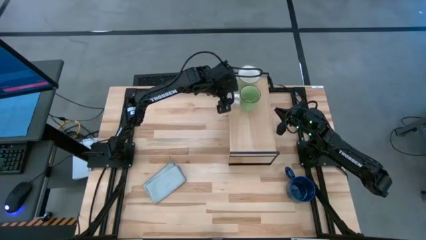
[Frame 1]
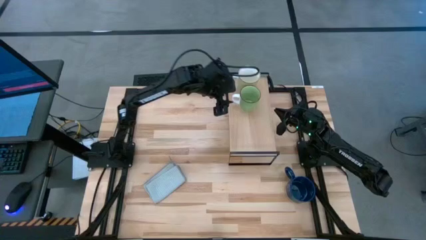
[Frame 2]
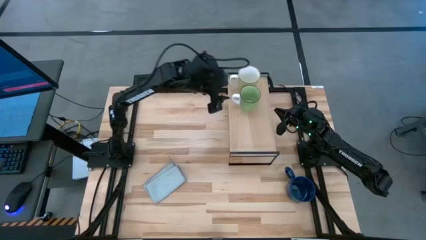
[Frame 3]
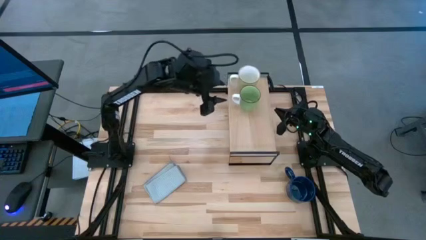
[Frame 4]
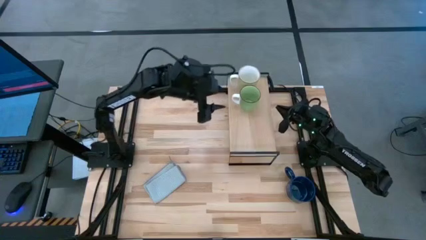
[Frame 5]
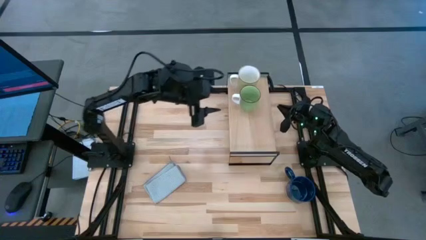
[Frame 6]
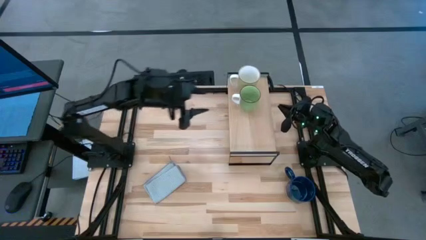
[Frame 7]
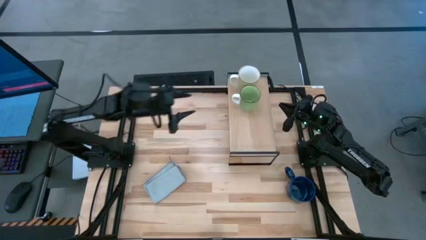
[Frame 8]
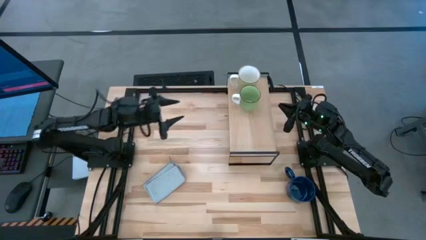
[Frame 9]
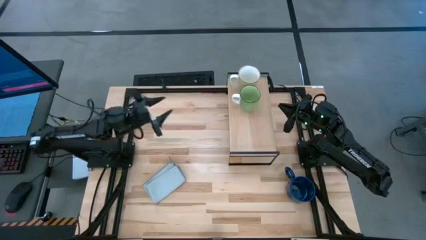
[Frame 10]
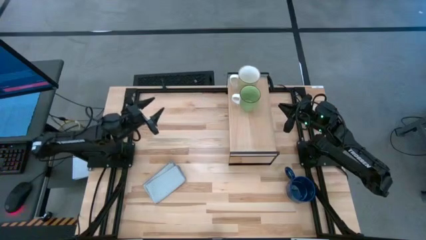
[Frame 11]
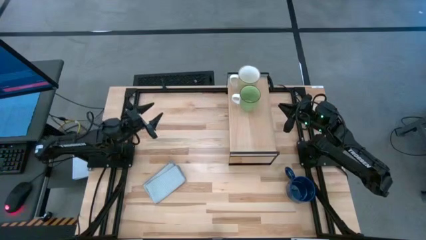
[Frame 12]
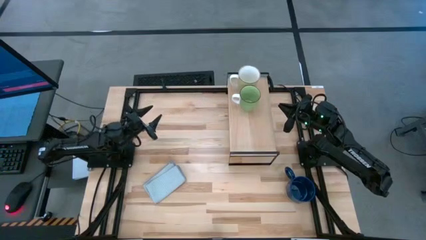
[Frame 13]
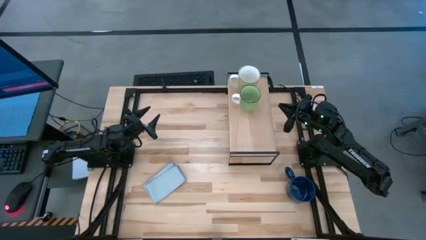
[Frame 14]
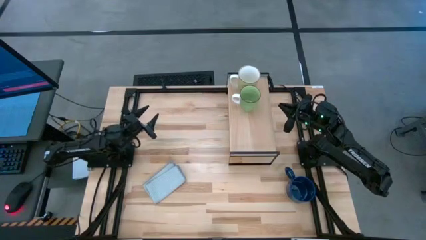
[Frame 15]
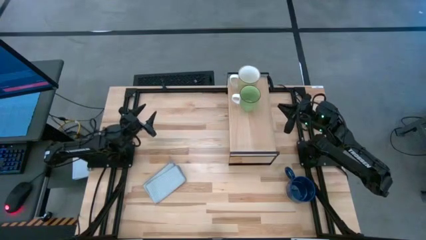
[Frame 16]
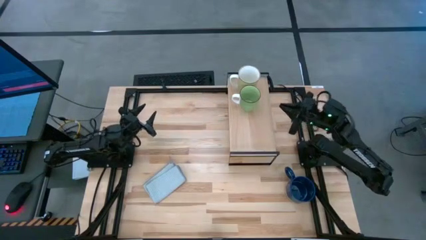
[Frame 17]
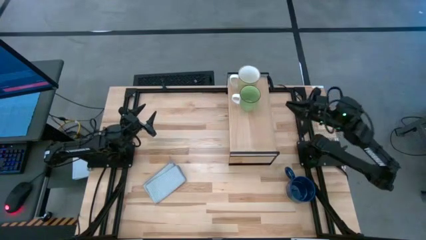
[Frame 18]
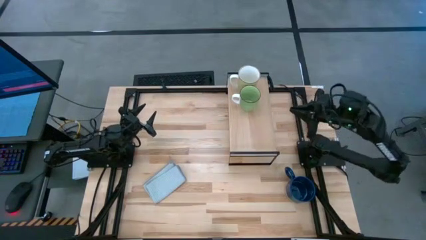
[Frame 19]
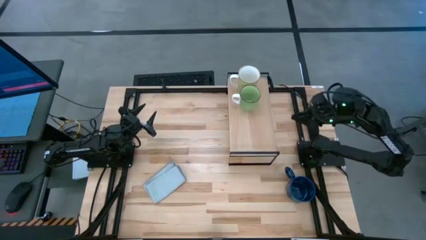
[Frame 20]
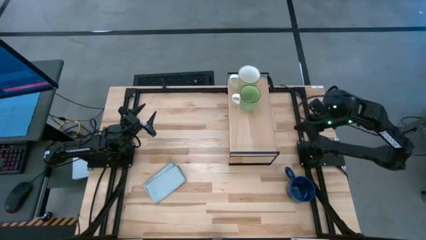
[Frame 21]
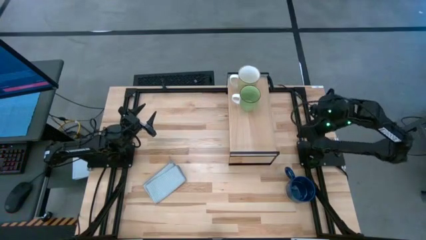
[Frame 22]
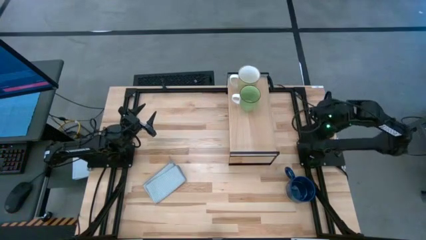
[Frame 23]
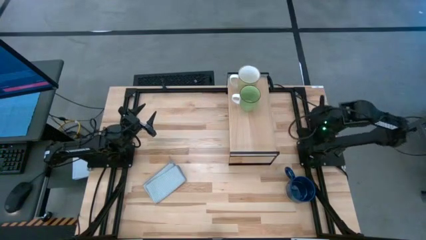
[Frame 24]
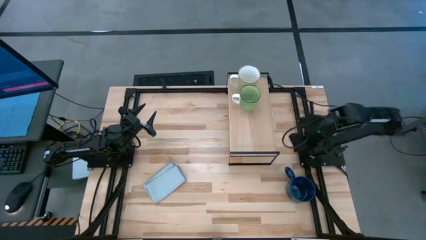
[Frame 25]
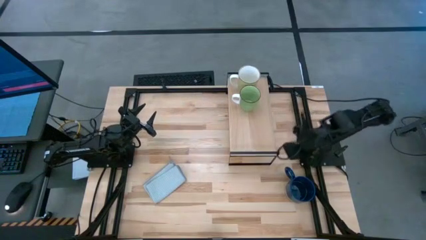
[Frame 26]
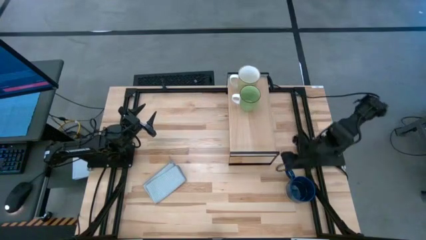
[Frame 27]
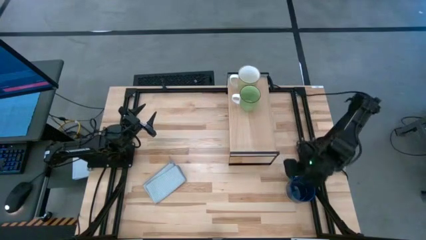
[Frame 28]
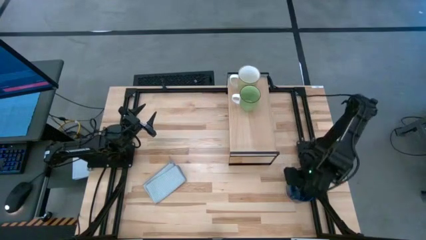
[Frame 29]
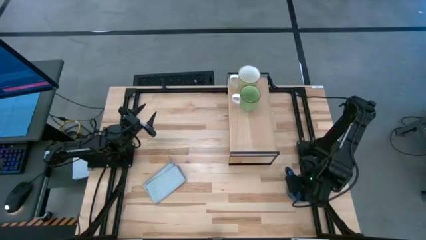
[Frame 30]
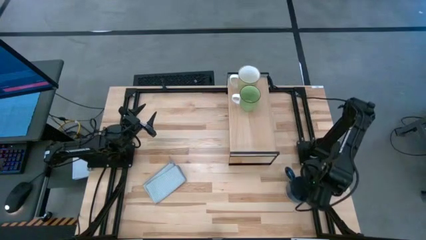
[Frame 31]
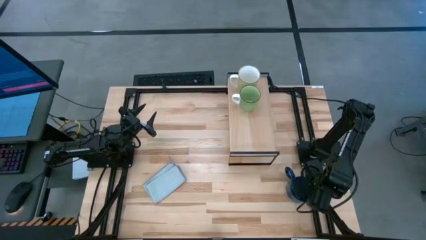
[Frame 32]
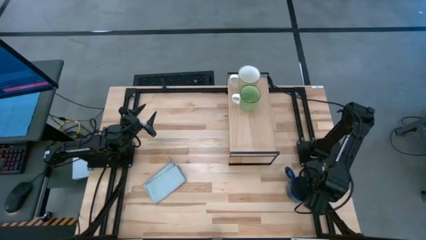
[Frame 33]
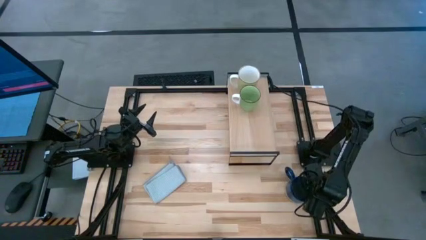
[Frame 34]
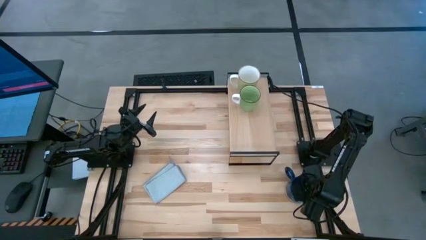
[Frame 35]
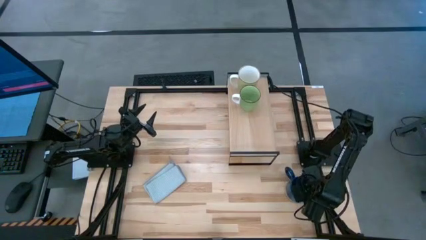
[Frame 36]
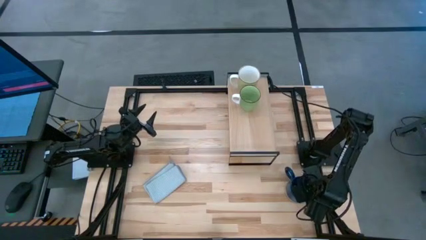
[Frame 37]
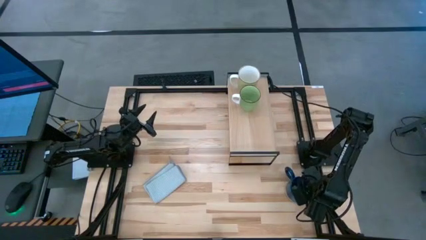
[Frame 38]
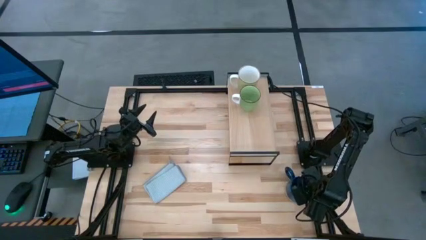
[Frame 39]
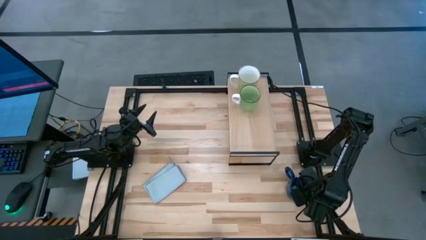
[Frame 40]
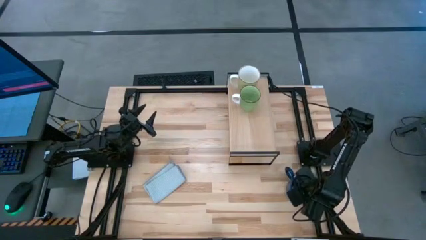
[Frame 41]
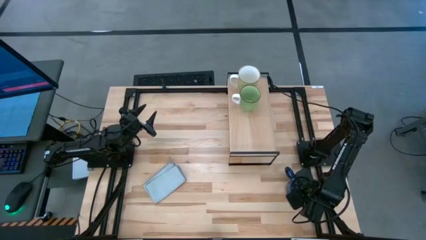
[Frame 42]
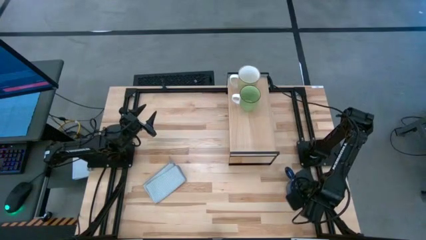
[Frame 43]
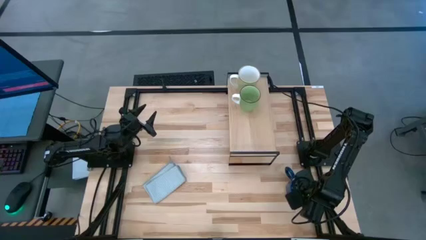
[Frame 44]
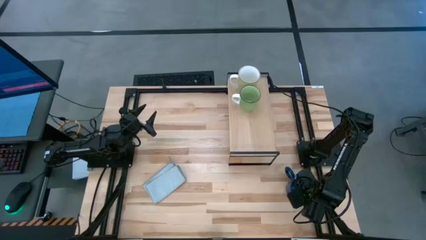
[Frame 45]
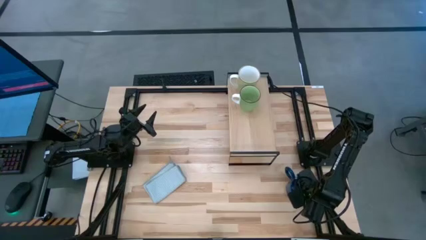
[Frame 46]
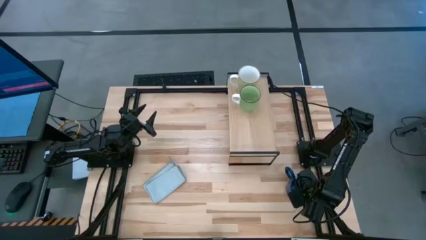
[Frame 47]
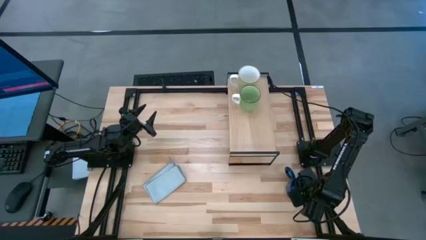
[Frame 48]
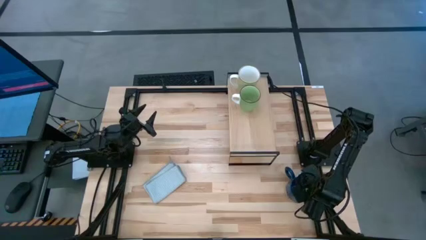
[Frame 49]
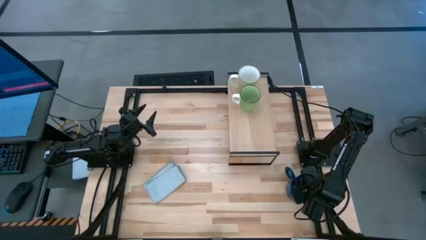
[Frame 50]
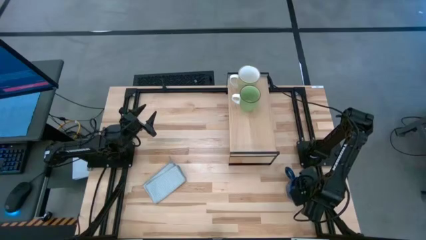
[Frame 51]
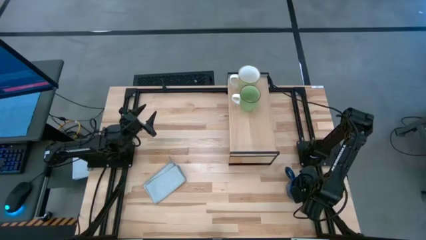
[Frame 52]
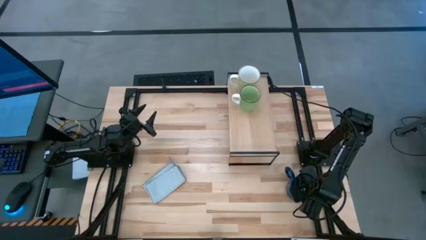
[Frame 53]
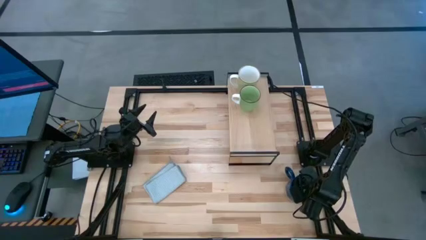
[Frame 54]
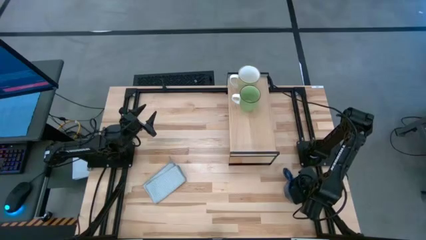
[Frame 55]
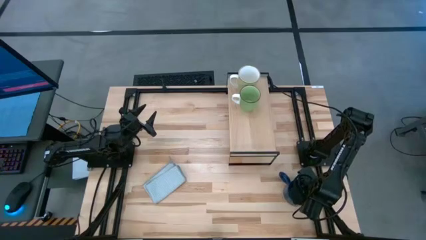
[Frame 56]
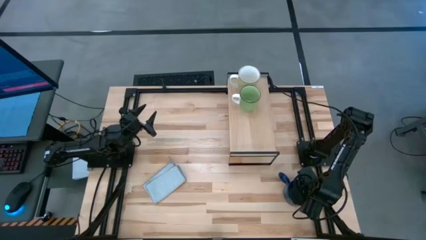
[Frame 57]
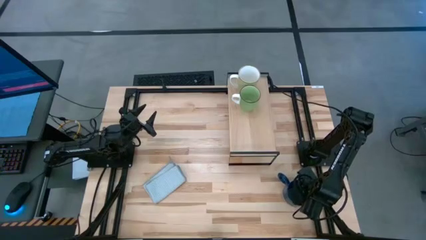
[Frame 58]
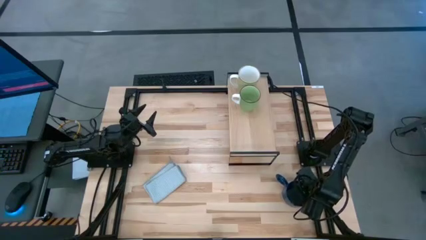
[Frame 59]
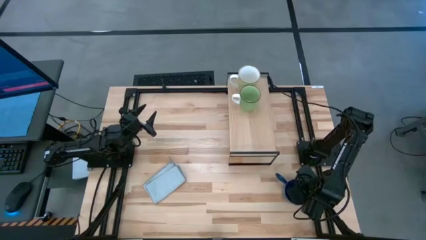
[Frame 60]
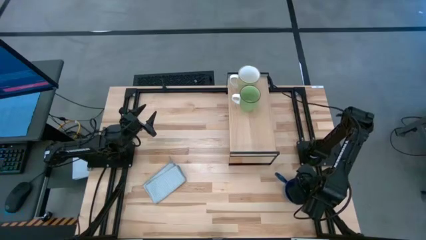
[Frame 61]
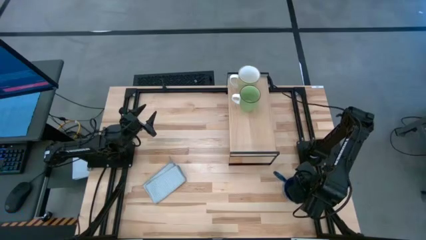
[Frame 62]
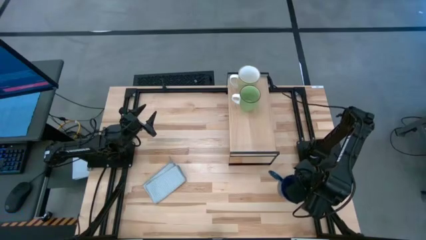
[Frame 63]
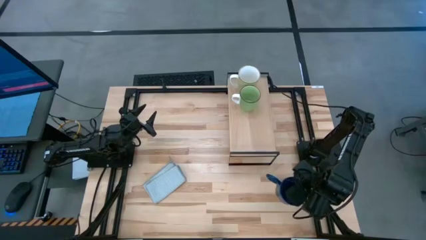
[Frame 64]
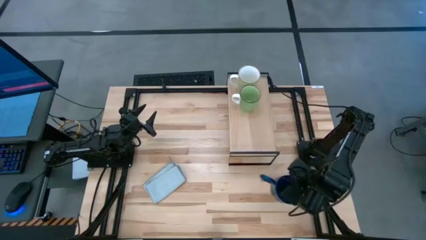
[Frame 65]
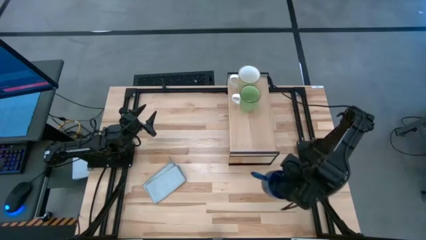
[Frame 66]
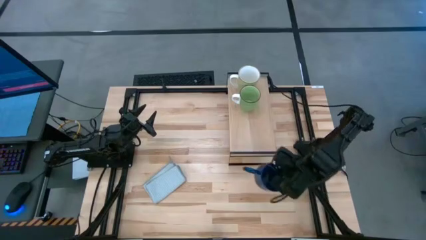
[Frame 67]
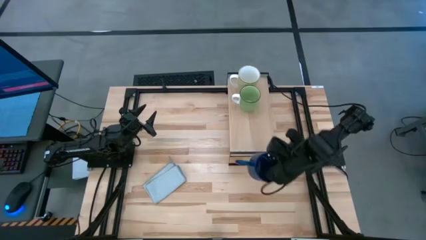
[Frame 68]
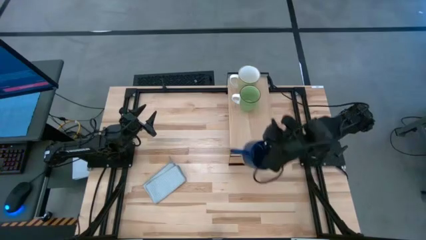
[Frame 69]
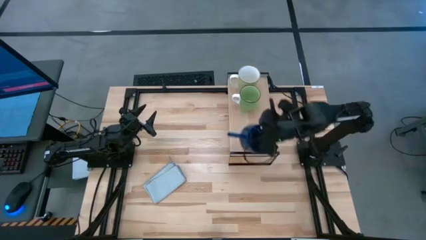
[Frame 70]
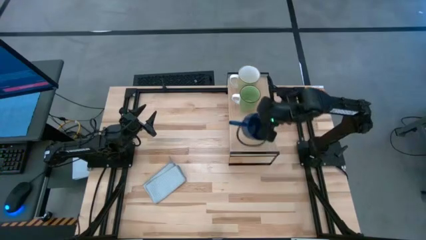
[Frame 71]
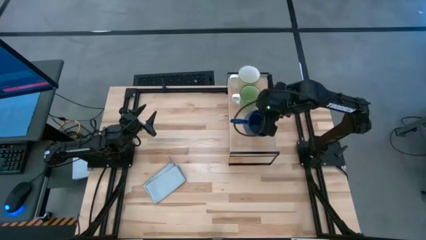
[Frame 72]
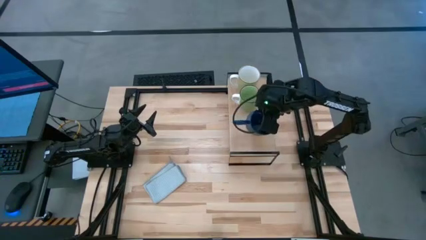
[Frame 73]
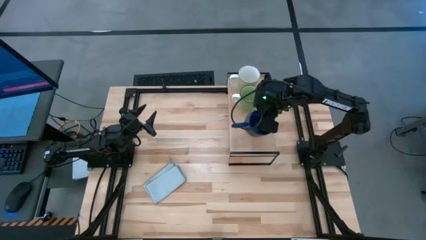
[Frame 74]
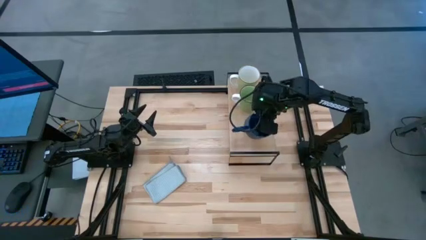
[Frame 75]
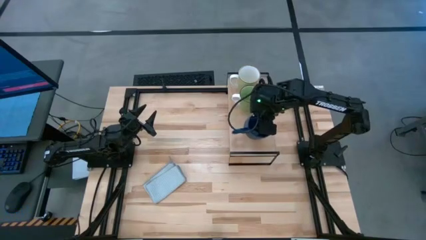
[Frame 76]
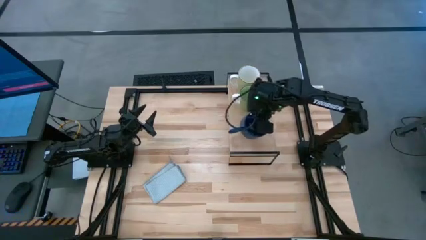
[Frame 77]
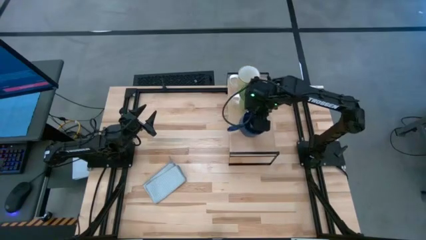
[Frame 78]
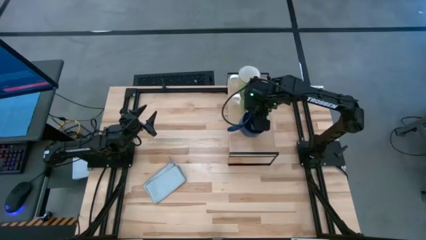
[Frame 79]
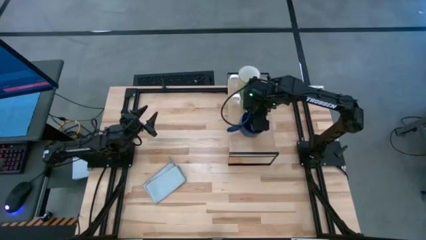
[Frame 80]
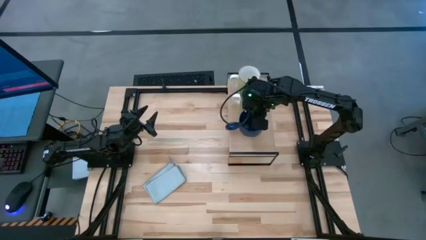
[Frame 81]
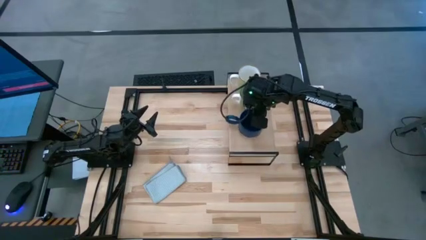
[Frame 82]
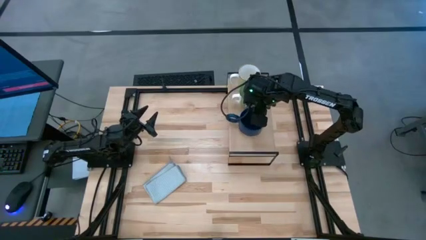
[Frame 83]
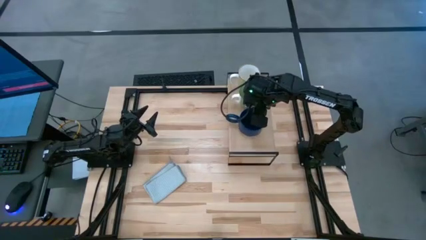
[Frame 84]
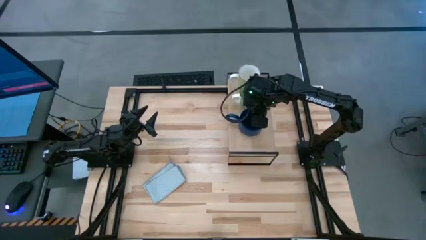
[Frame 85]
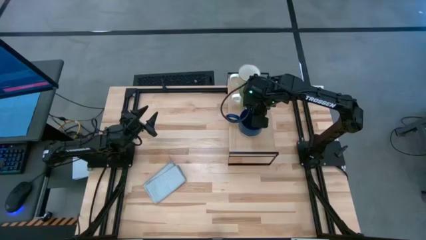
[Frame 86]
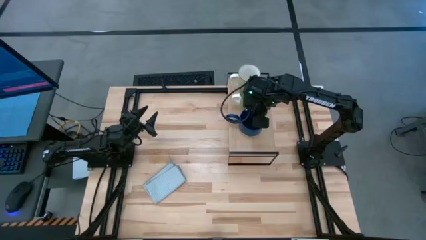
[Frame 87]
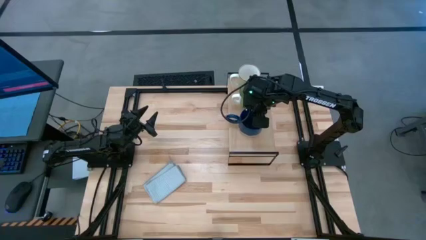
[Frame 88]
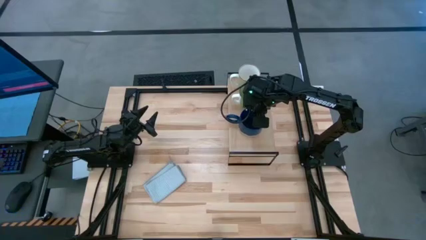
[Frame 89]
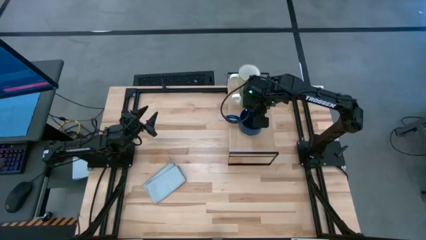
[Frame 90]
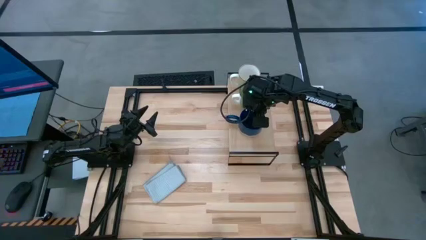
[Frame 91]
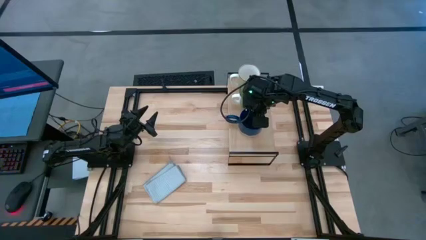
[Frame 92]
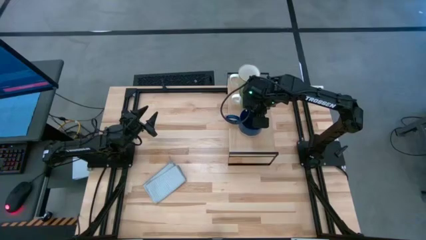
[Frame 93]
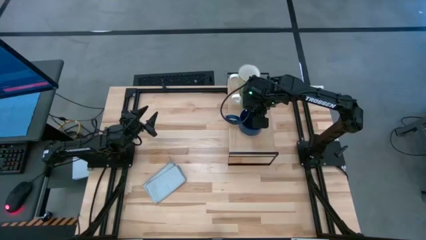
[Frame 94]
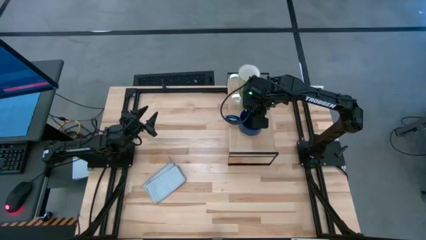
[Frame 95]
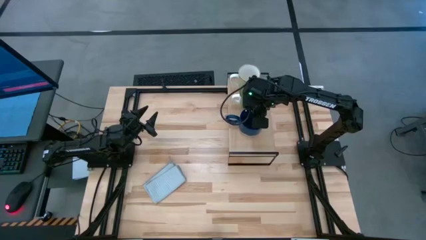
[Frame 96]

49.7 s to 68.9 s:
Task: Stack small to large cups/mugs on shelf
Put the blue mug on the shelf
